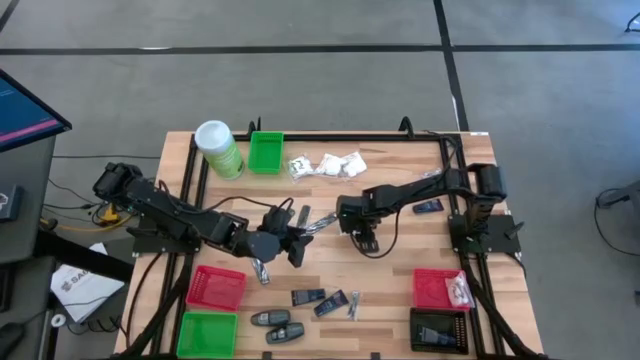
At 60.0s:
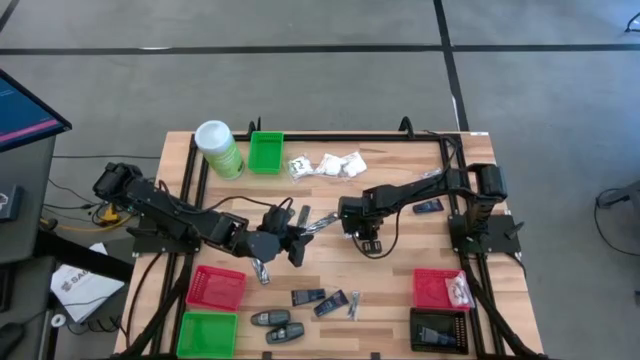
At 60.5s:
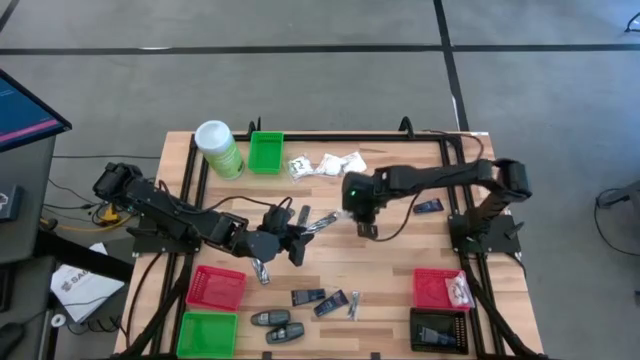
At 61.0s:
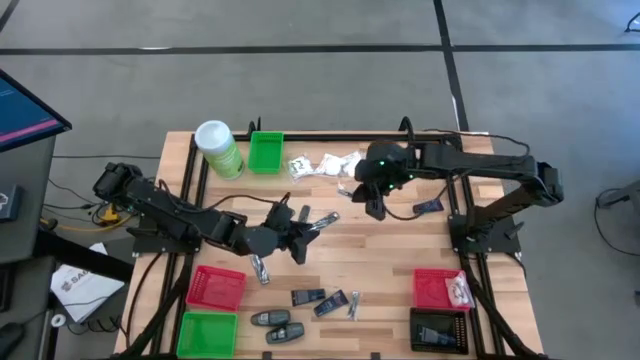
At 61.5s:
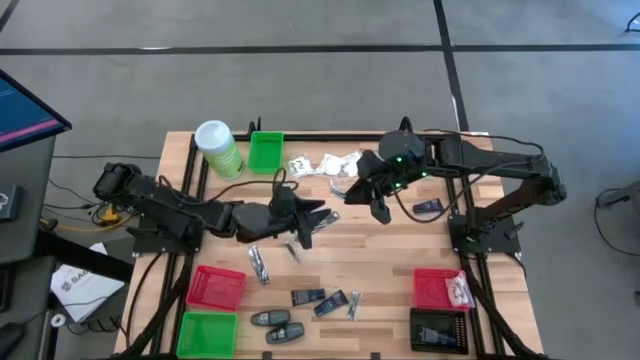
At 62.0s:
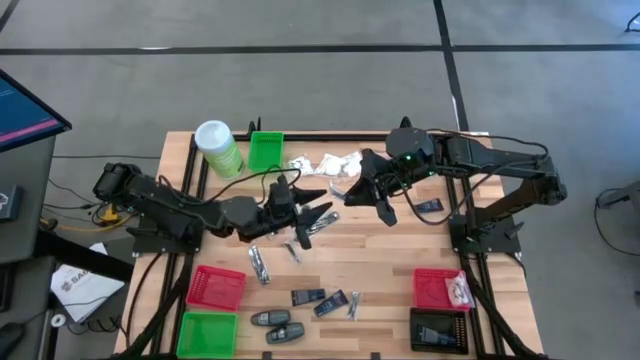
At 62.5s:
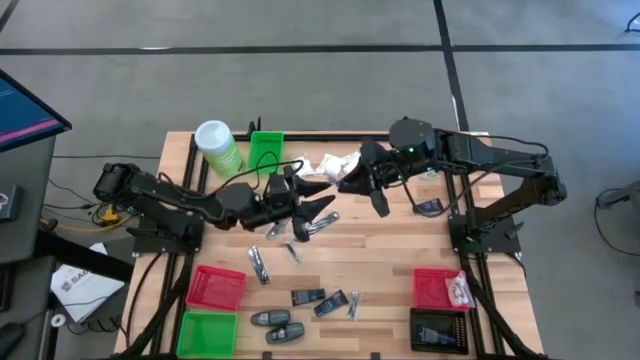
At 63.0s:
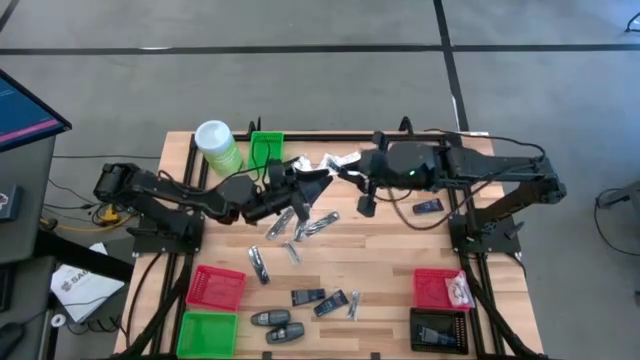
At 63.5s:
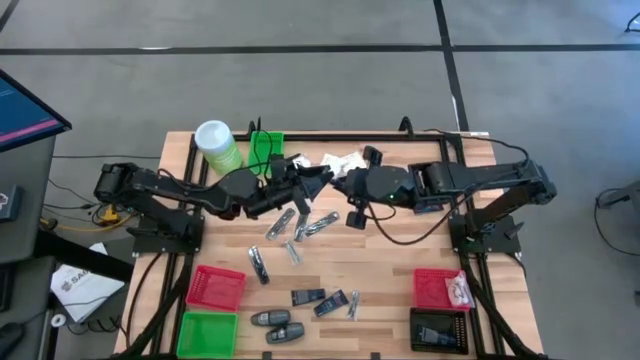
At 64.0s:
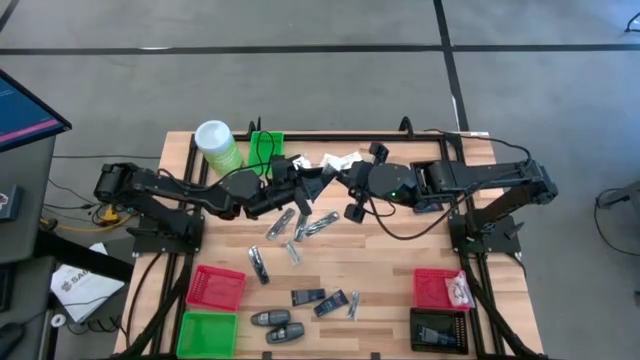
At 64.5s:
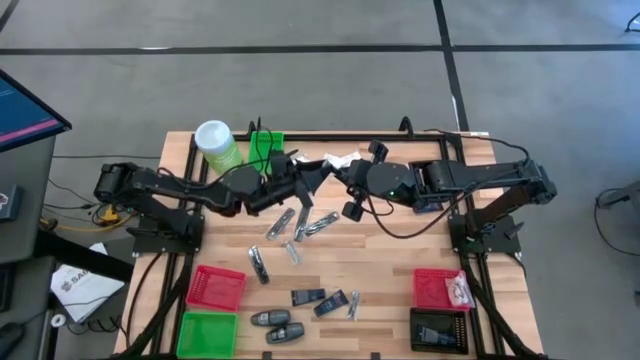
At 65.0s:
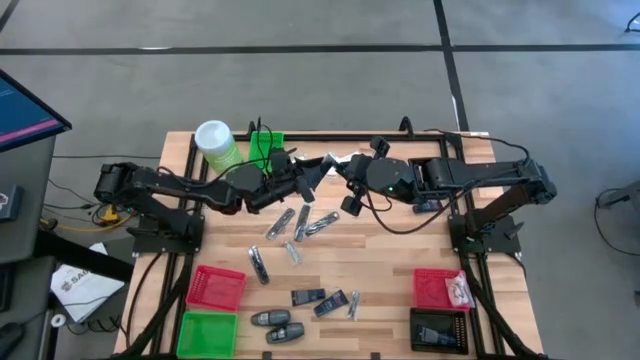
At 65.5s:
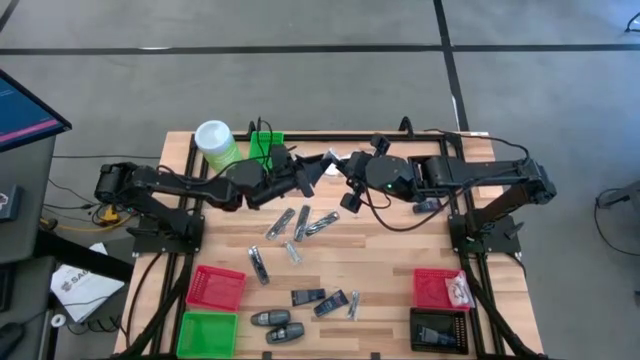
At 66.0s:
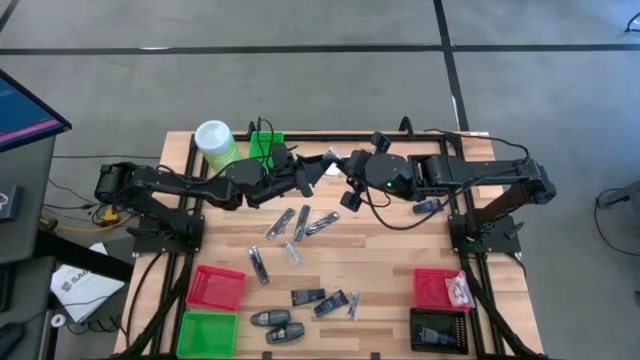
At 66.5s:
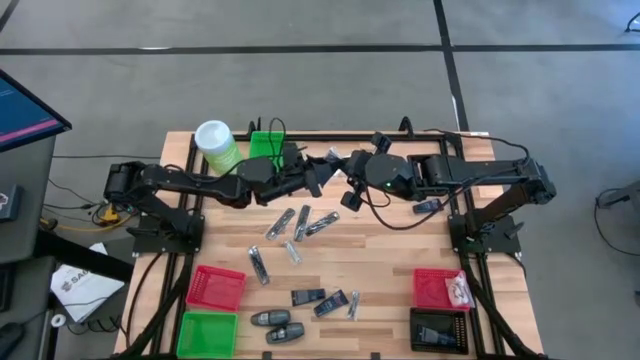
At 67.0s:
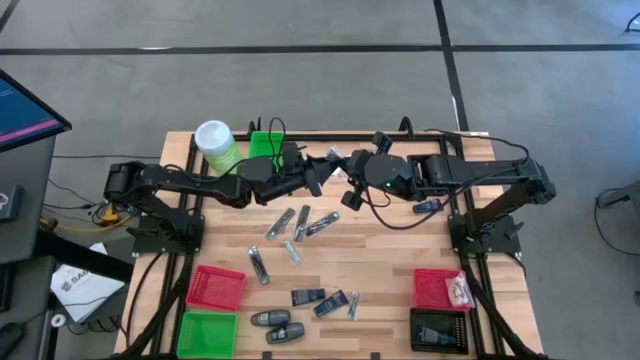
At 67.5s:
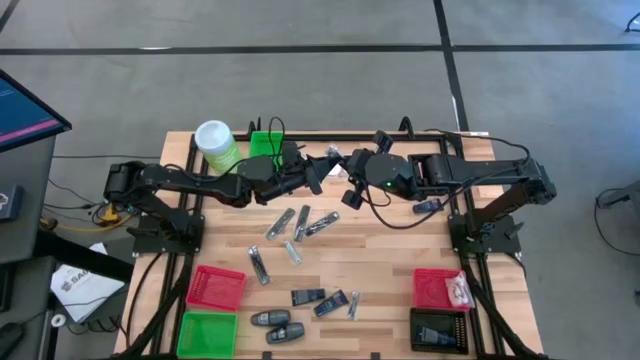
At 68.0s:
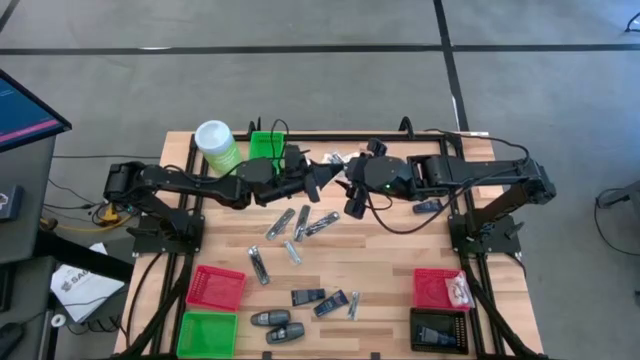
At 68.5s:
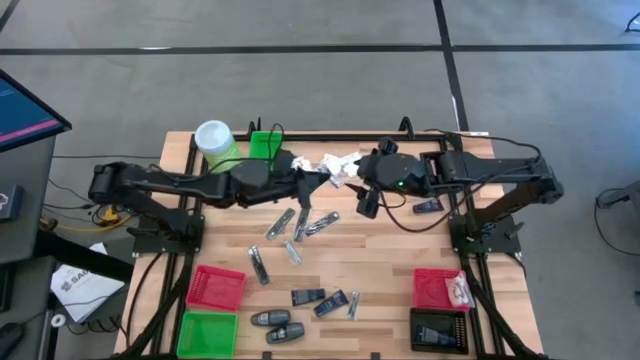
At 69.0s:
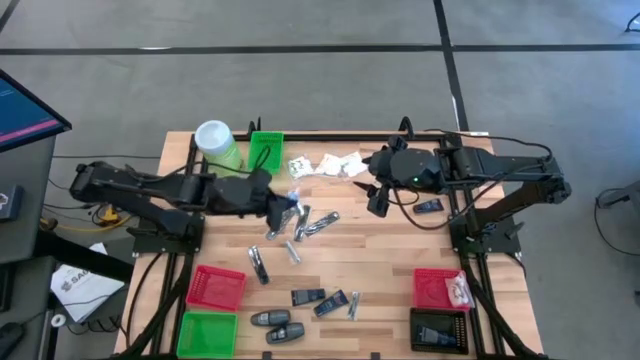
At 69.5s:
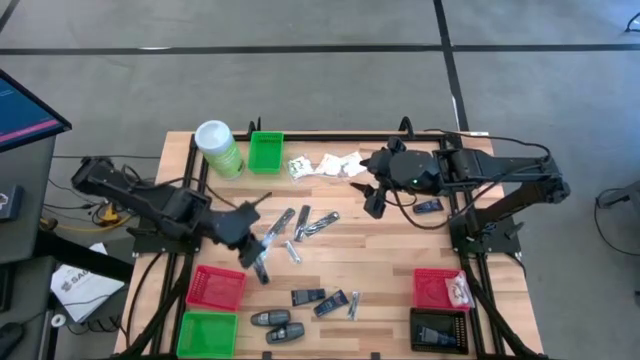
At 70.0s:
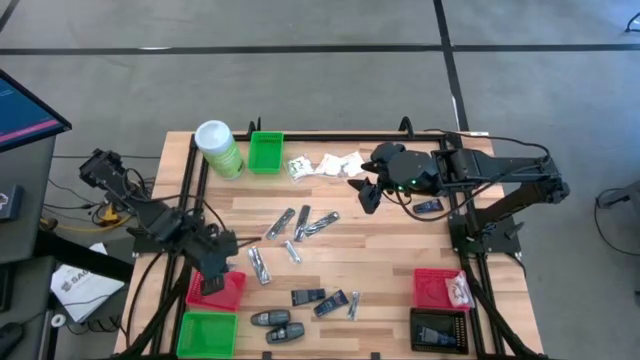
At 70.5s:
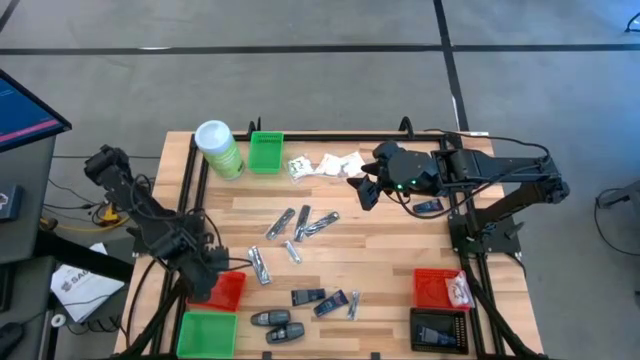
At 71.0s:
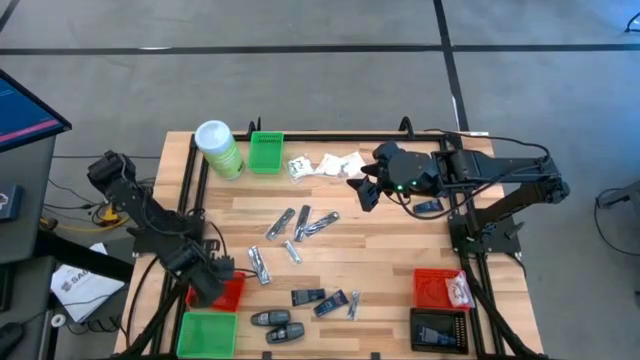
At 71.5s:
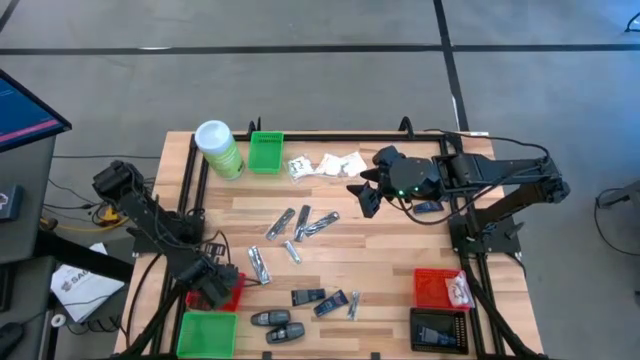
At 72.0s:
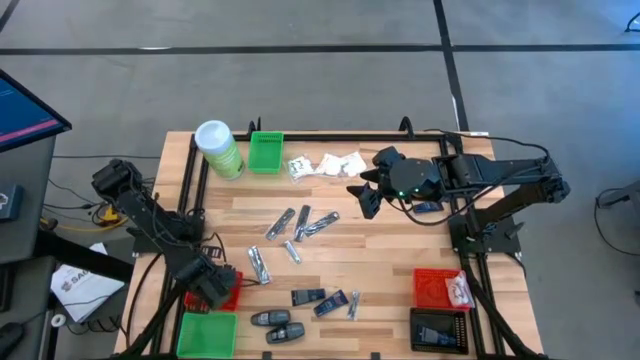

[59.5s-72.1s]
Task: Pick & Place Travel size toiletries
Put the nail cutter into the left red bin

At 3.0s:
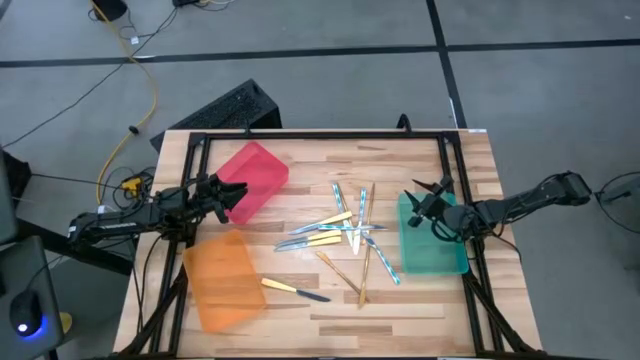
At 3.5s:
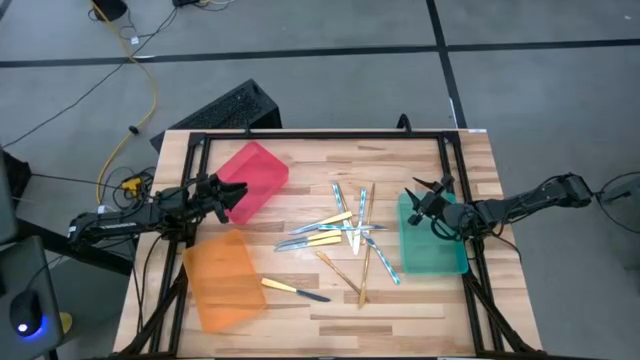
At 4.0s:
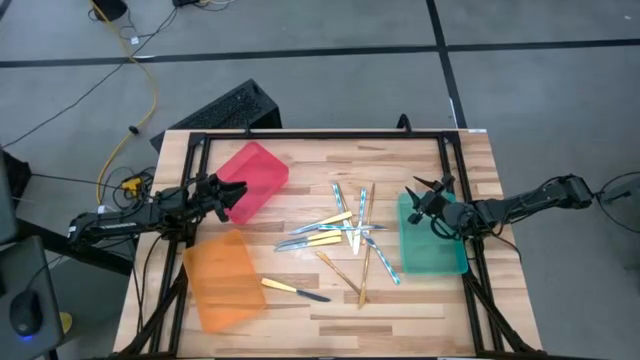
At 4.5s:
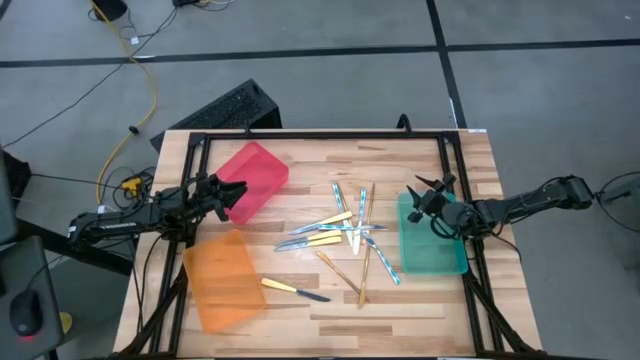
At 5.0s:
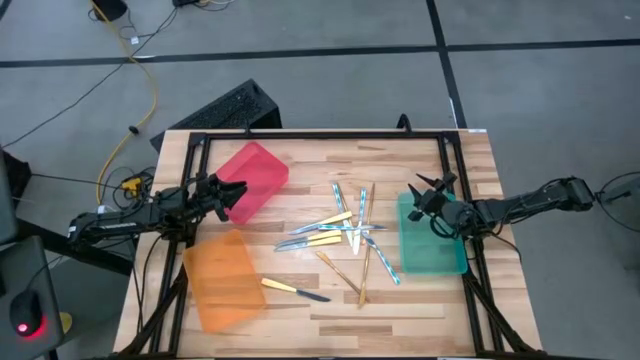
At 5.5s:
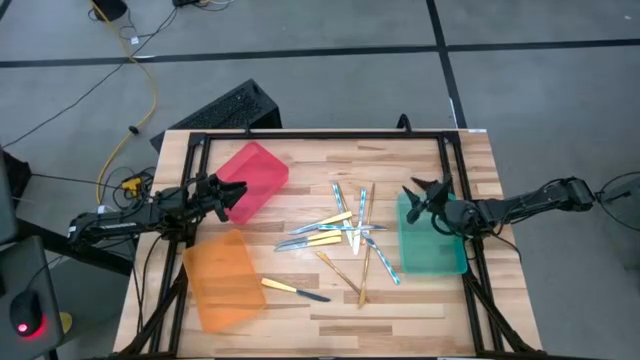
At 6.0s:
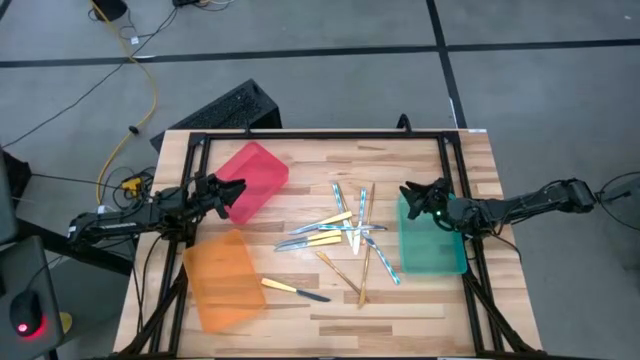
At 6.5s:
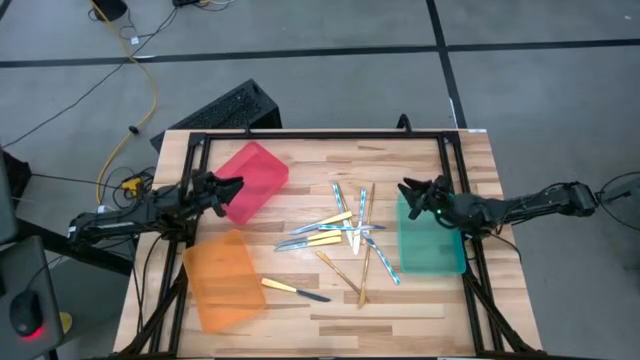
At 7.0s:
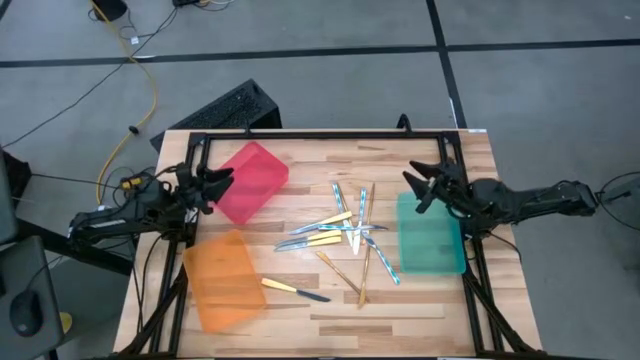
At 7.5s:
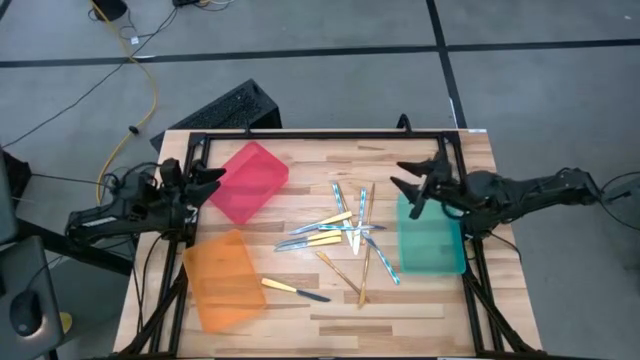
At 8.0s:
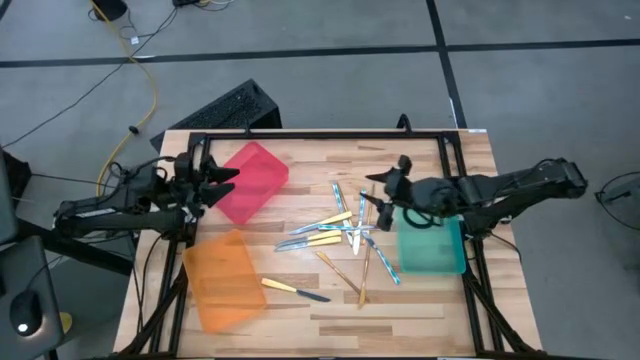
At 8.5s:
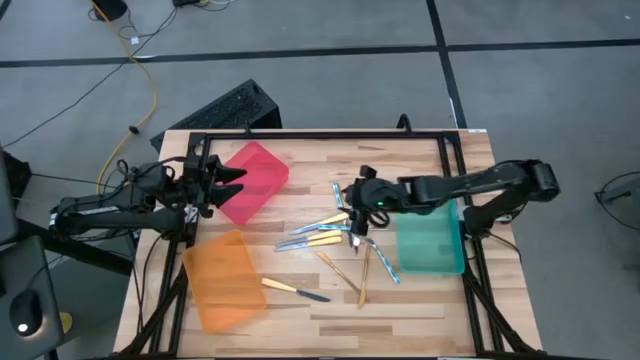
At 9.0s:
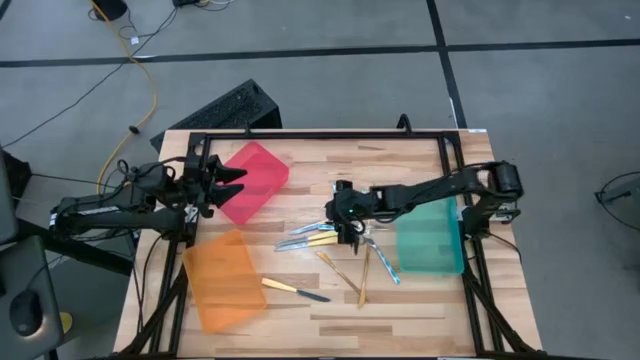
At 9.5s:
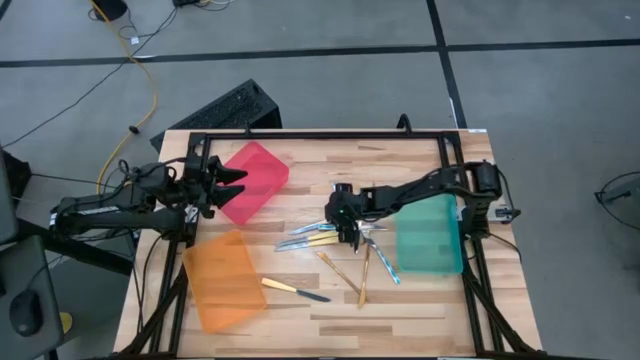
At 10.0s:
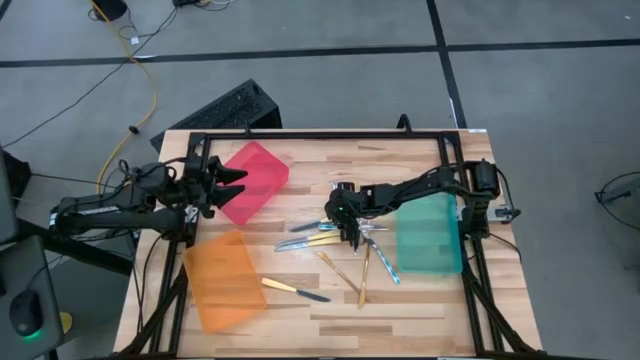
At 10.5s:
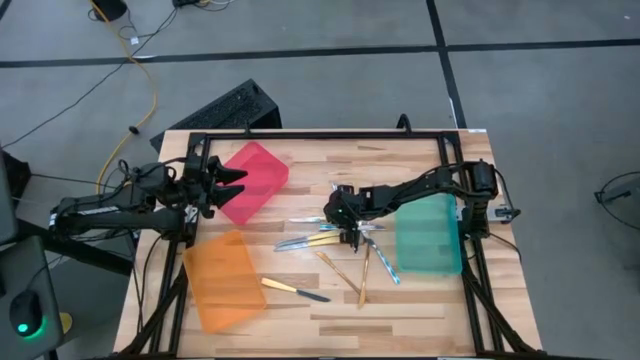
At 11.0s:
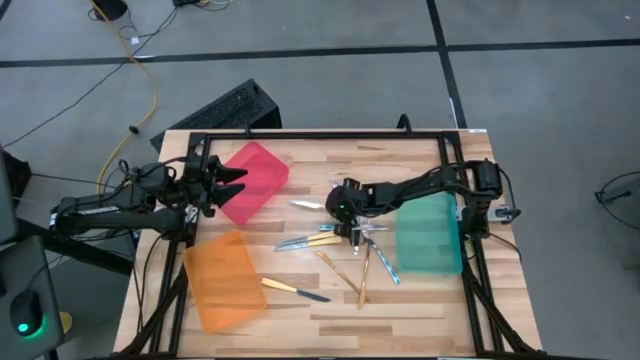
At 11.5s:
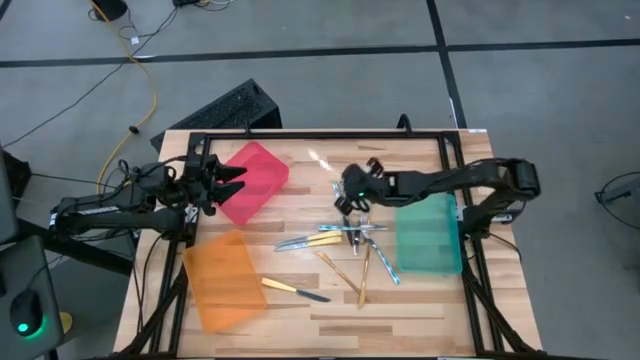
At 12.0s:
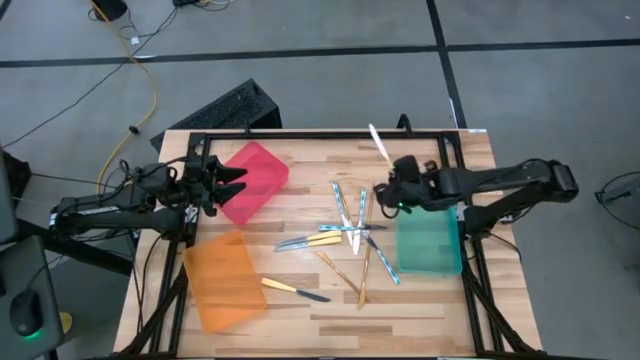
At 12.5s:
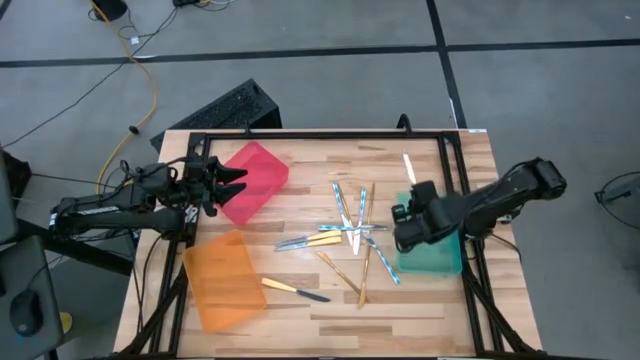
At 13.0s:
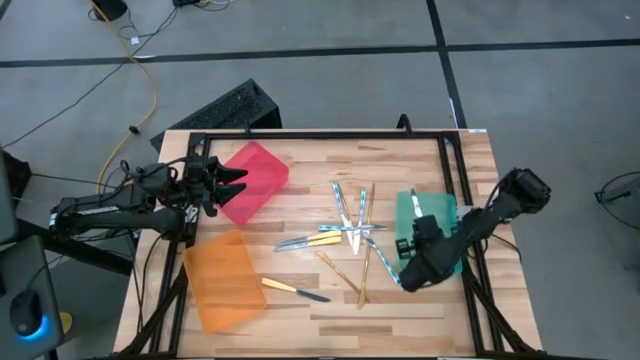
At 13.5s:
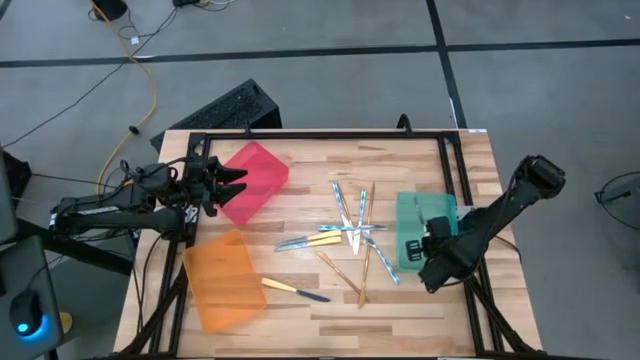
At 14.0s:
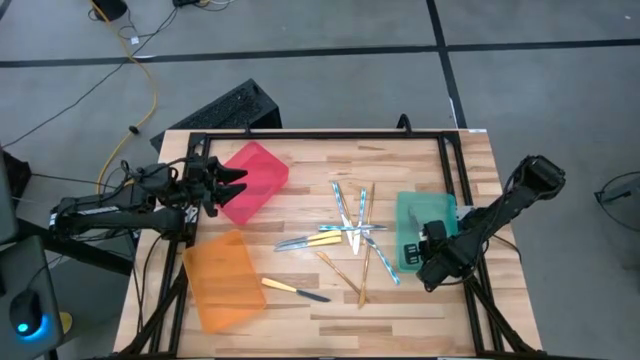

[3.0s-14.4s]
Task: Sort silverware by color (type)
Put the yellow knife into the green bin
